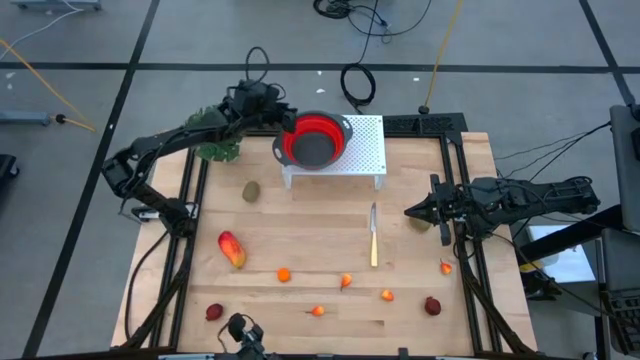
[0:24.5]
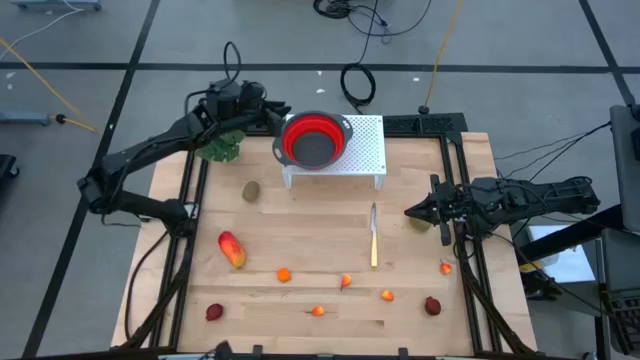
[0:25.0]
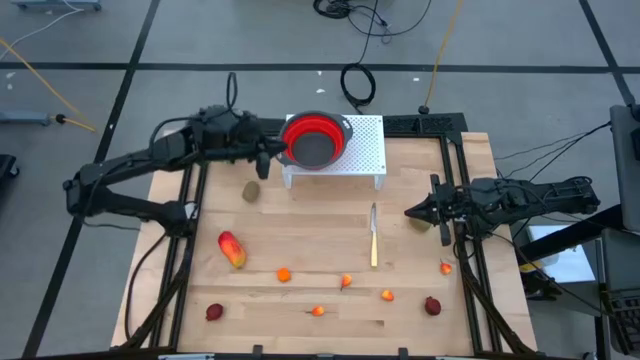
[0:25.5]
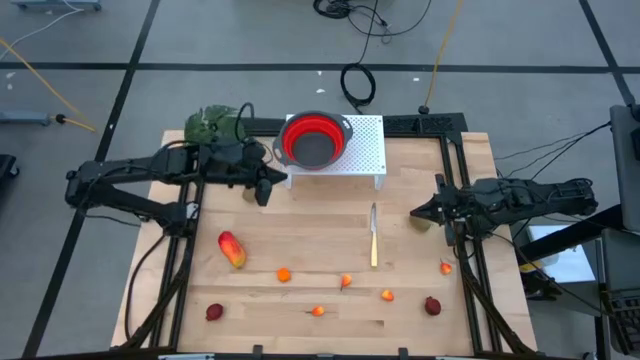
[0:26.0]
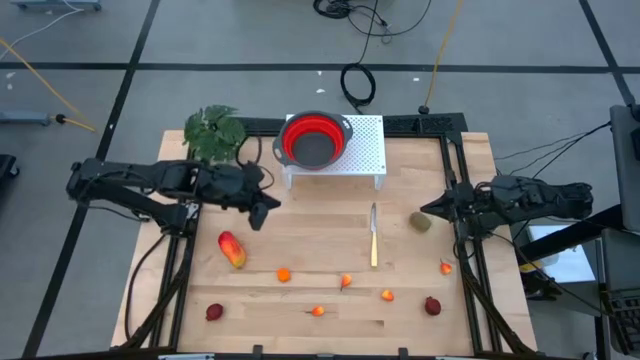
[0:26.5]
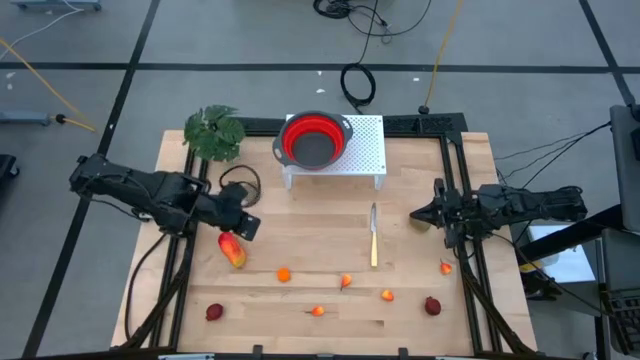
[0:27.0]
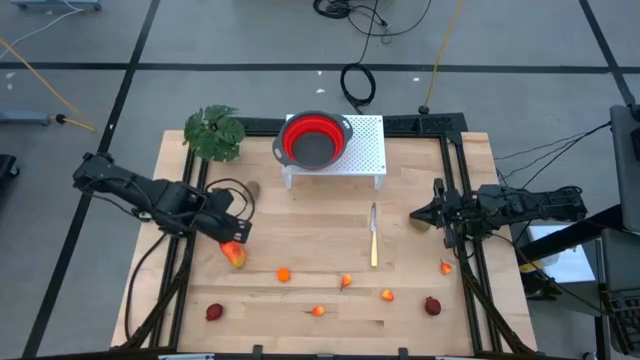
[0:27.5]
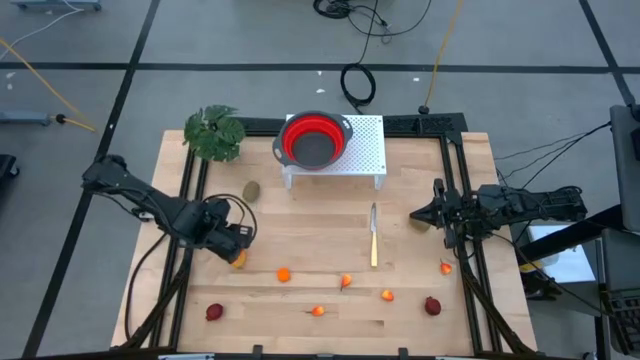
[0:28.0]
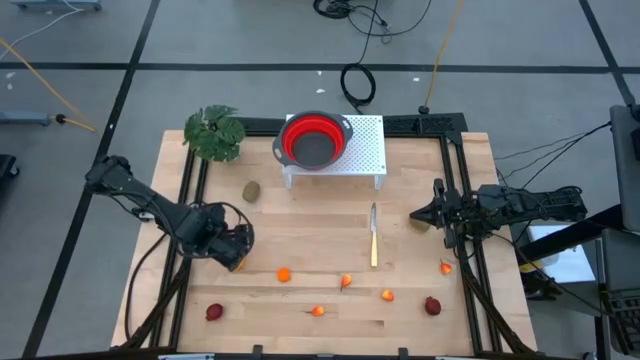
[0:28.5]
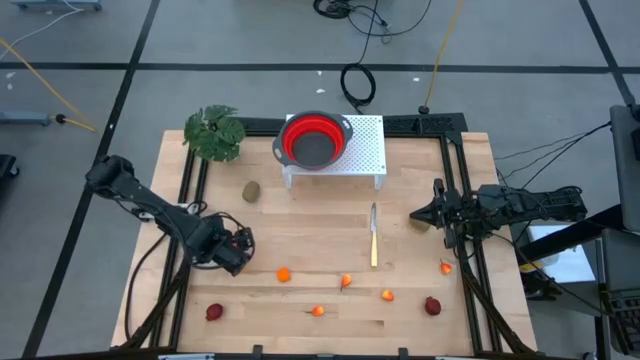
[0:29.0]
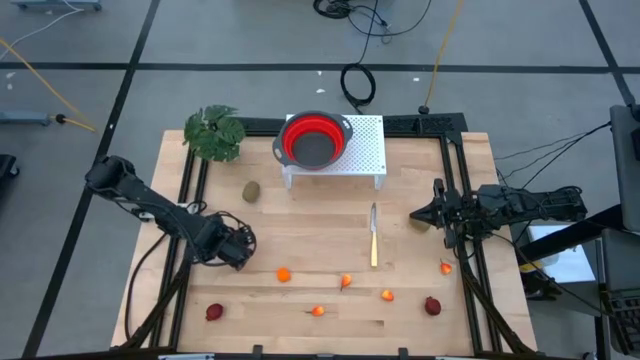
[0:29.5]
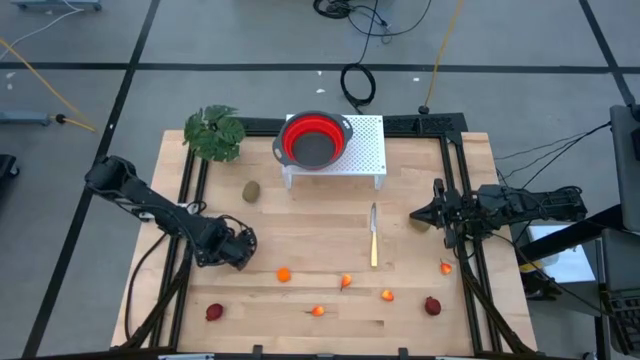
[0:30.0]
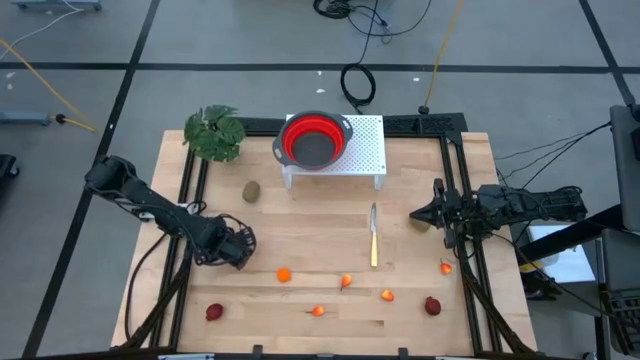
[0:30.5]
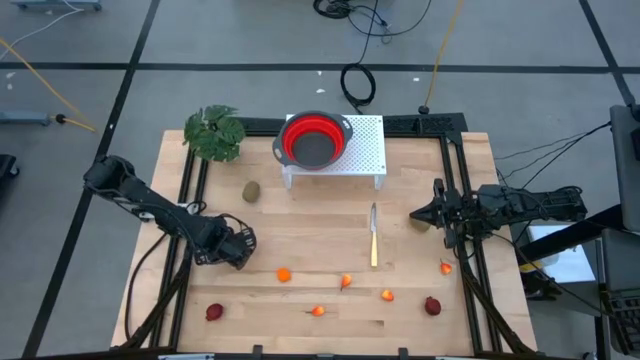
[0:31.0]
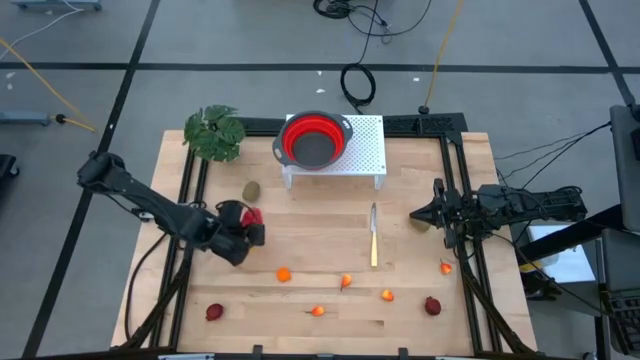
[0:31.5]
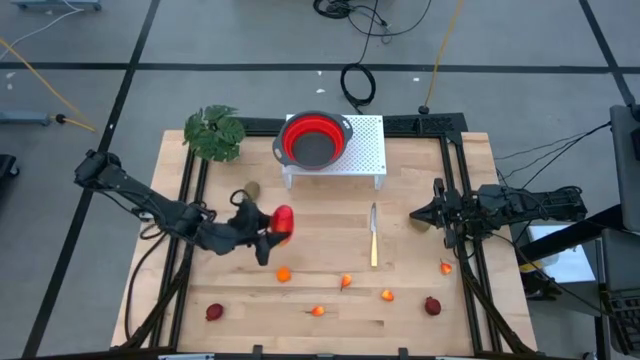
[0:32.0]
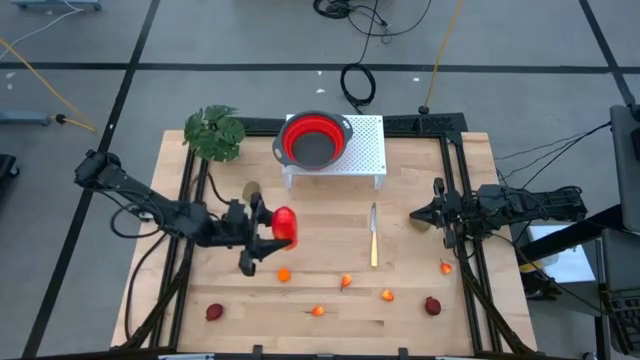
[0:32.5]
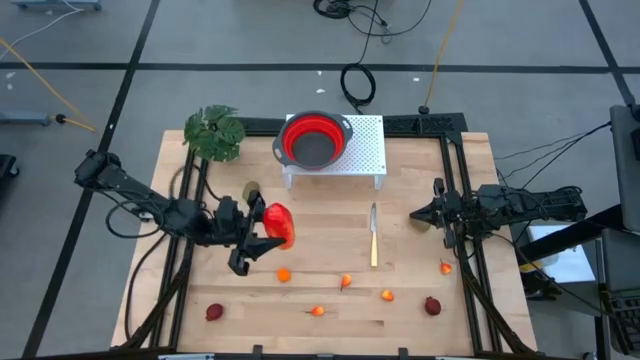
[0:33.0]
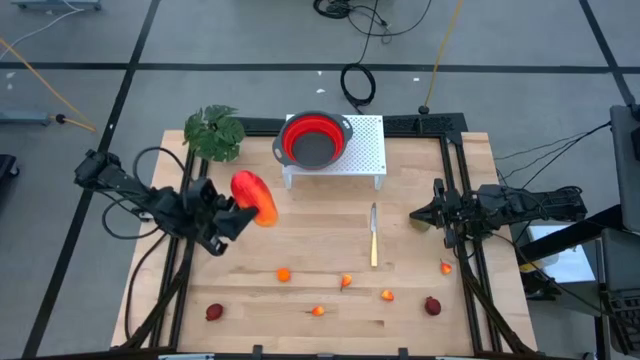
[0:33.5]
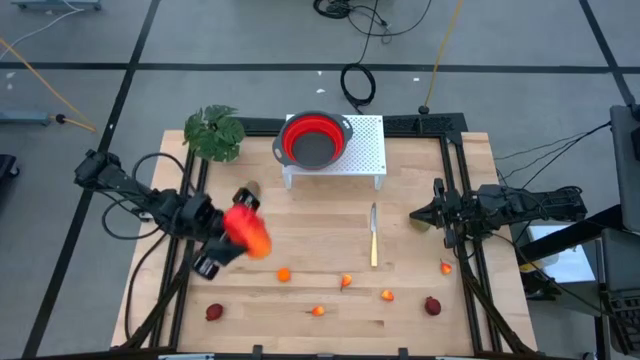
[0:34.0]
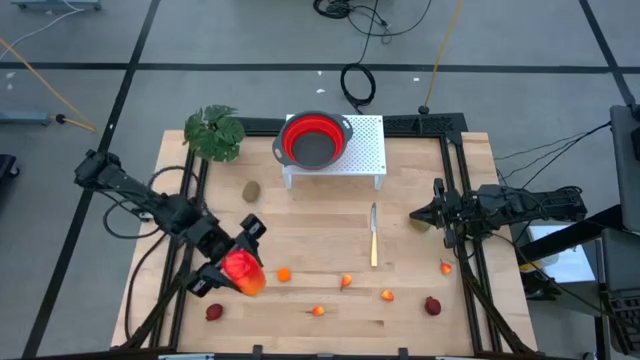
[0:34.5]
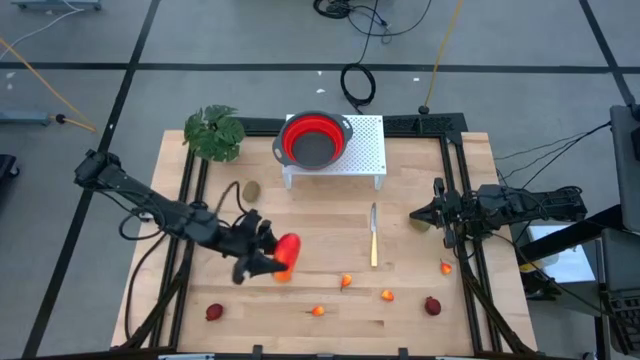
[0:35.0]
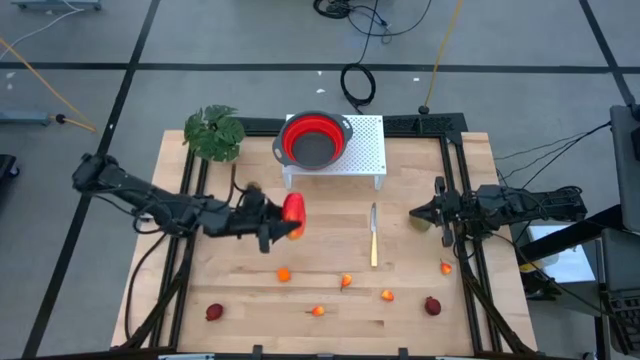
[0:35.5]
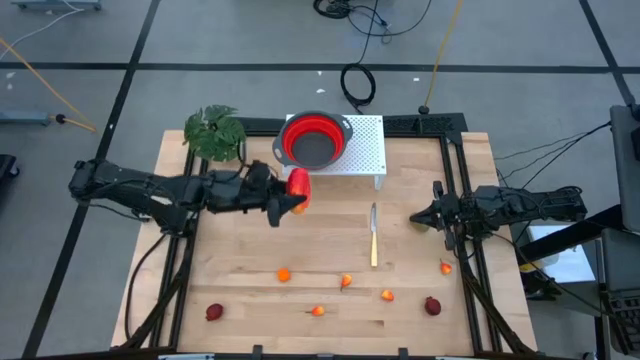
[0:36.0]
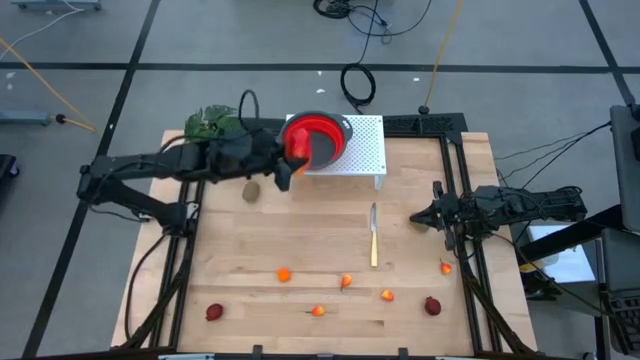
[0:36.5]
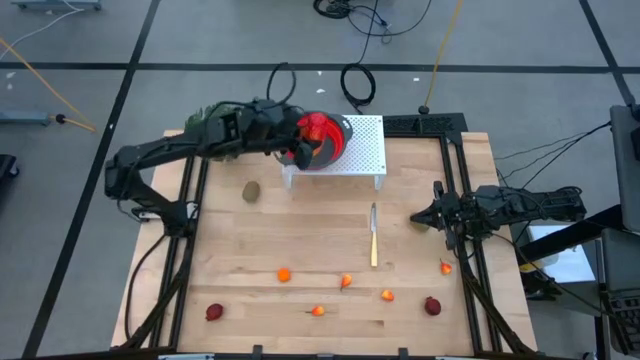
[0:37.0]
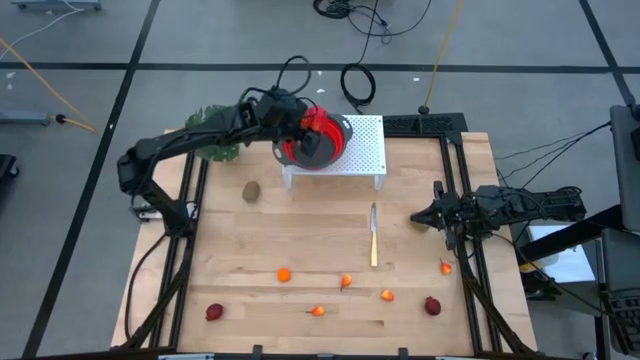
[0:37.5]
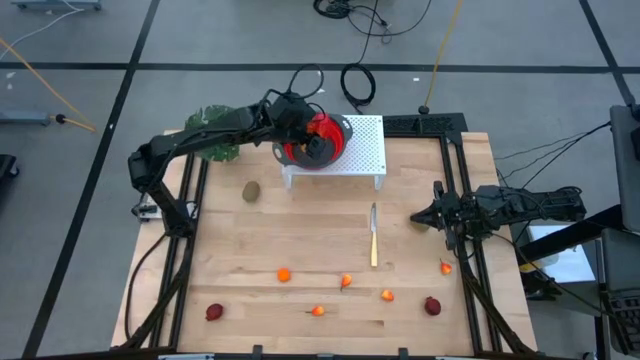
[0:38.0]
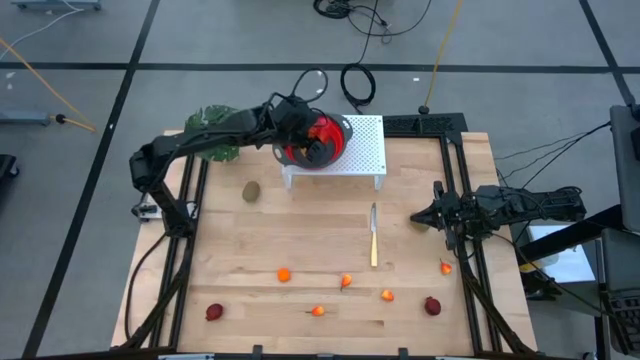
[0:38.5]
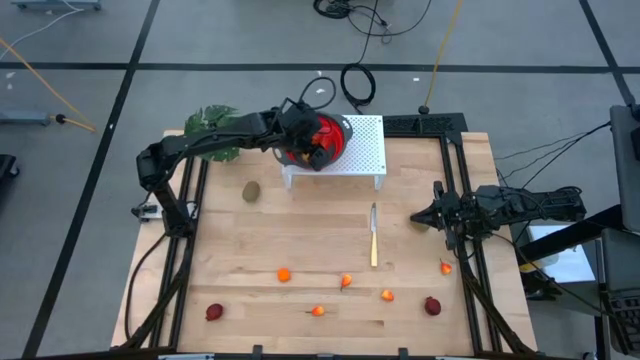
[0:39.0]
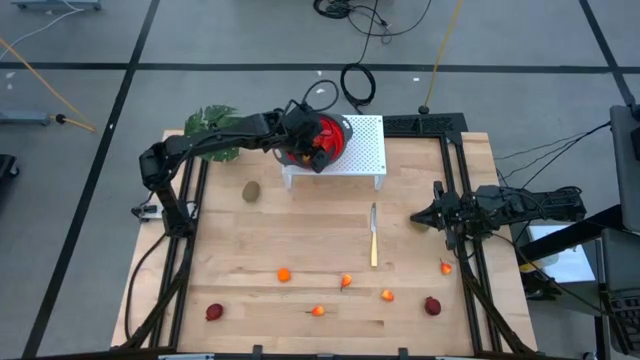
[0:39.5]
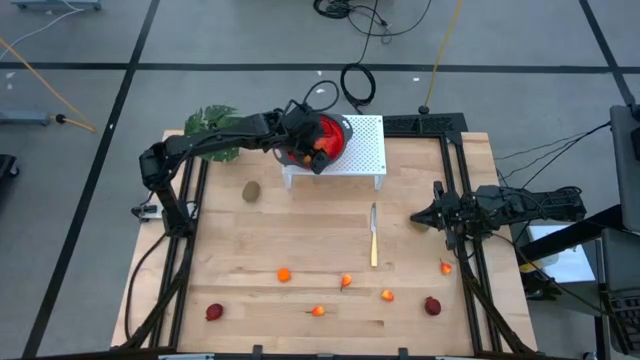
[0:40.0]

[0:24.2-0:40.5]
Task: Pick & Place Fruit
Put the orange mango into the red strainer bowl on the shelf
